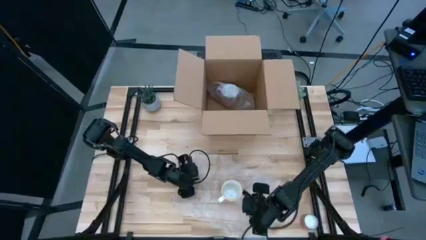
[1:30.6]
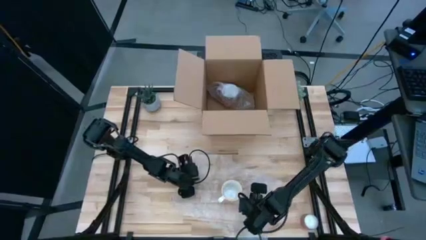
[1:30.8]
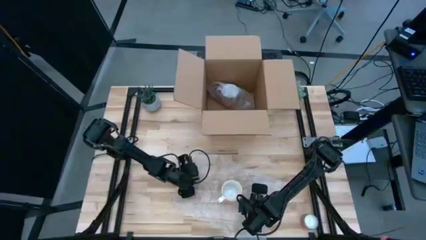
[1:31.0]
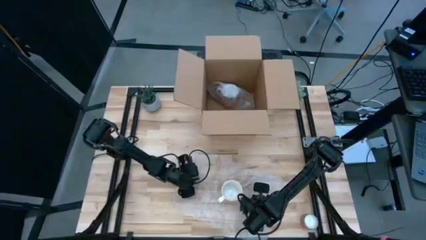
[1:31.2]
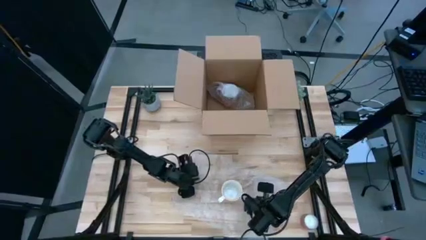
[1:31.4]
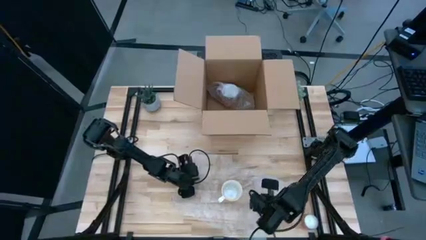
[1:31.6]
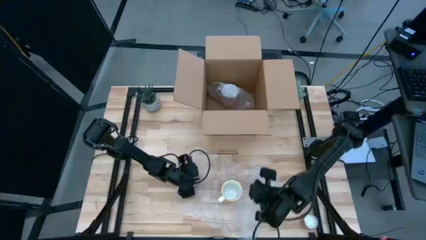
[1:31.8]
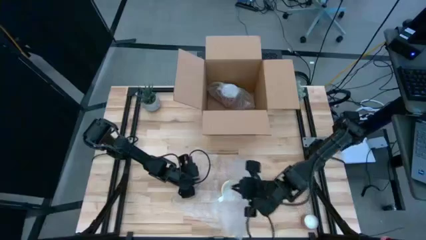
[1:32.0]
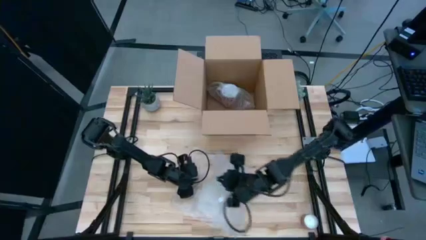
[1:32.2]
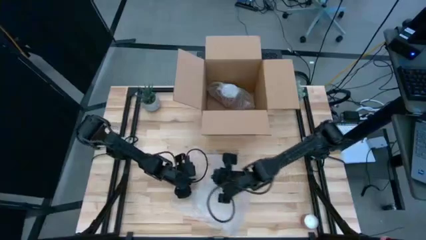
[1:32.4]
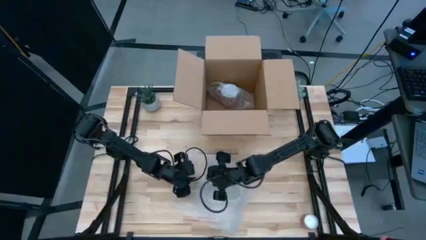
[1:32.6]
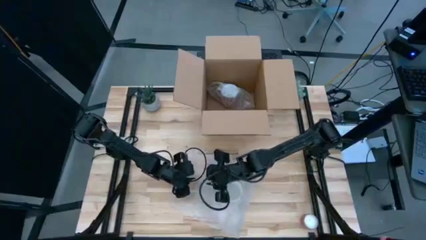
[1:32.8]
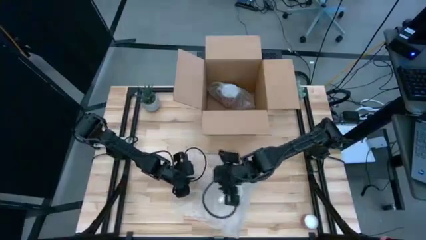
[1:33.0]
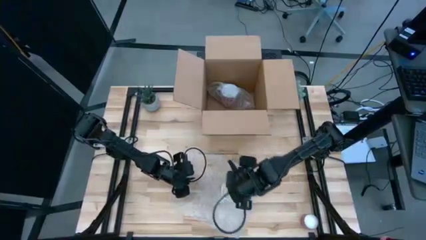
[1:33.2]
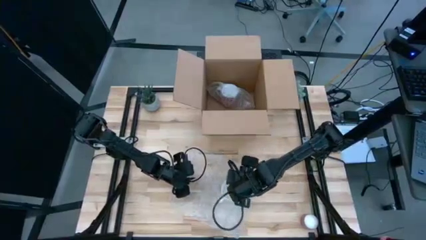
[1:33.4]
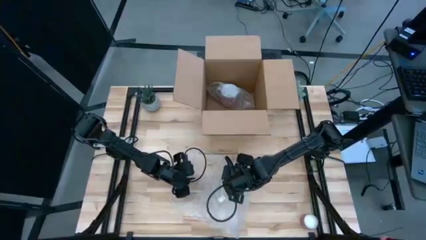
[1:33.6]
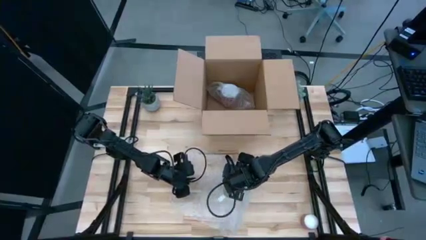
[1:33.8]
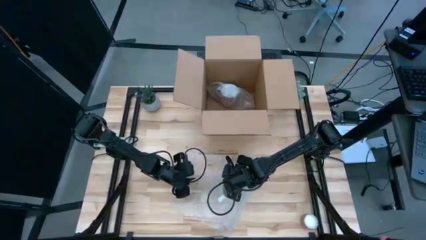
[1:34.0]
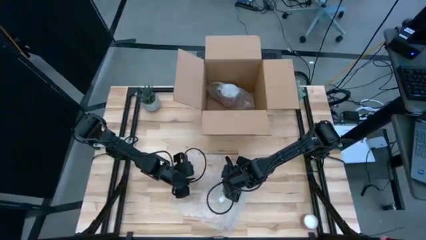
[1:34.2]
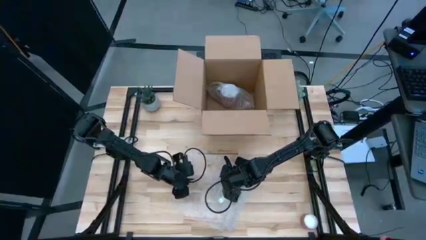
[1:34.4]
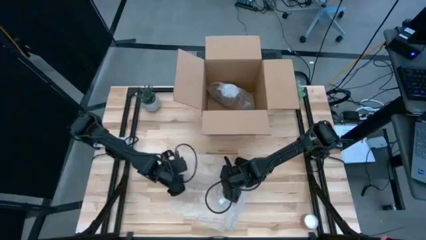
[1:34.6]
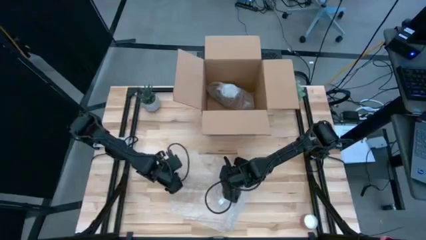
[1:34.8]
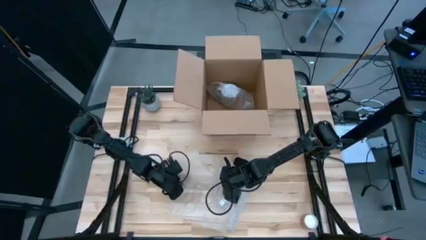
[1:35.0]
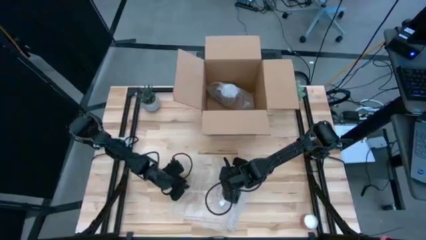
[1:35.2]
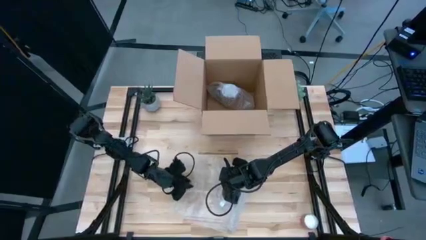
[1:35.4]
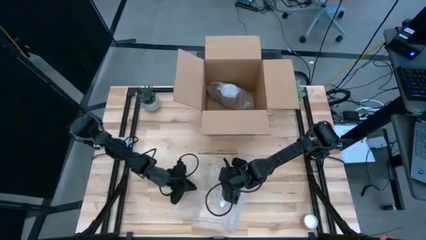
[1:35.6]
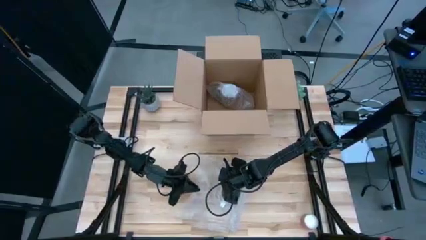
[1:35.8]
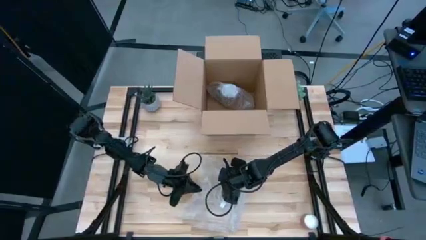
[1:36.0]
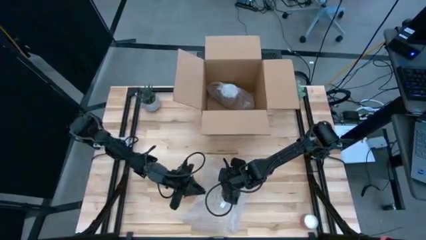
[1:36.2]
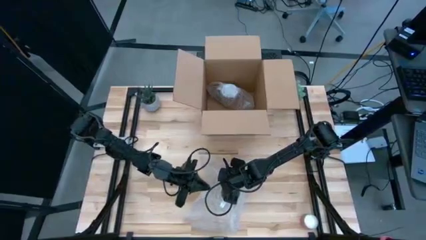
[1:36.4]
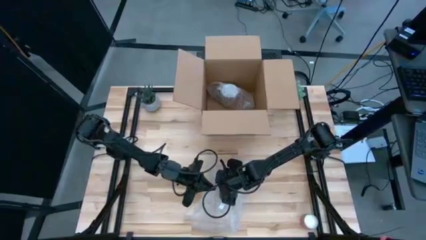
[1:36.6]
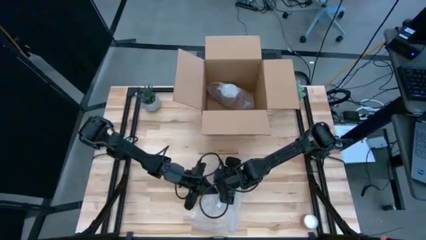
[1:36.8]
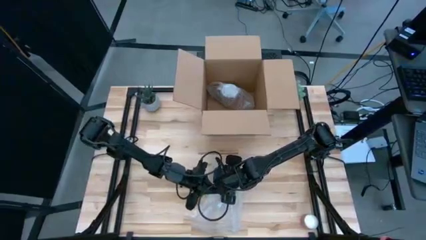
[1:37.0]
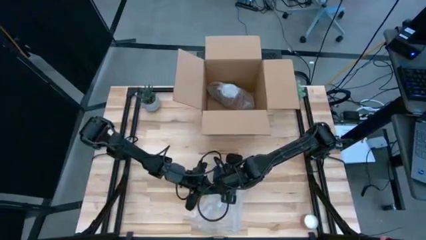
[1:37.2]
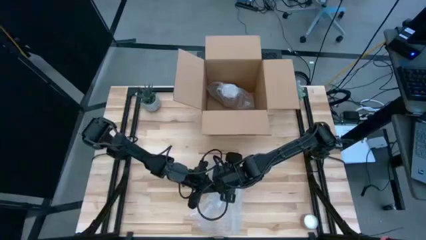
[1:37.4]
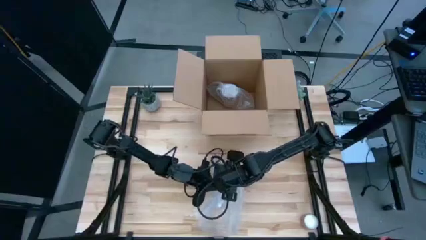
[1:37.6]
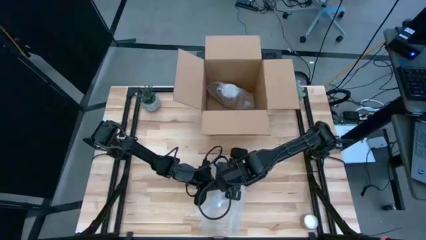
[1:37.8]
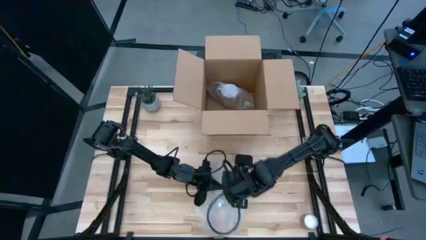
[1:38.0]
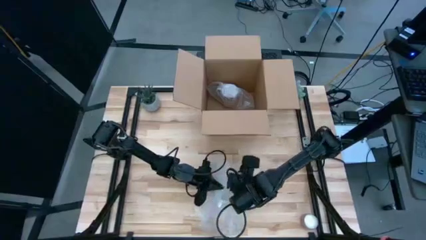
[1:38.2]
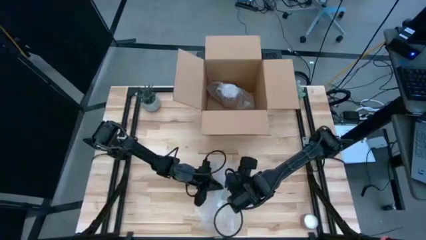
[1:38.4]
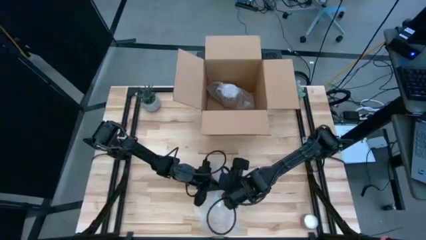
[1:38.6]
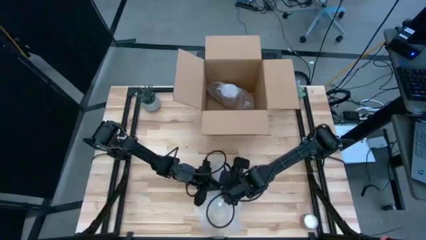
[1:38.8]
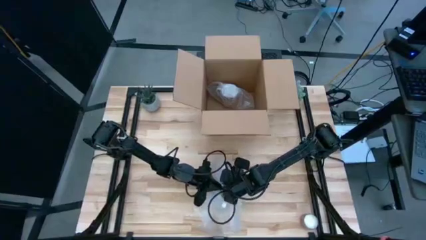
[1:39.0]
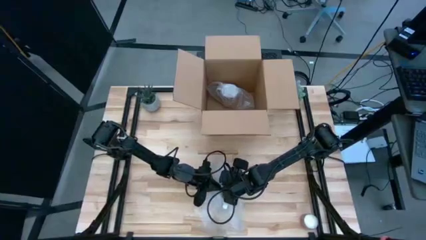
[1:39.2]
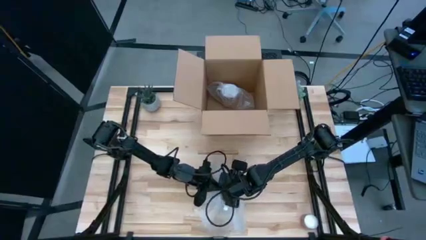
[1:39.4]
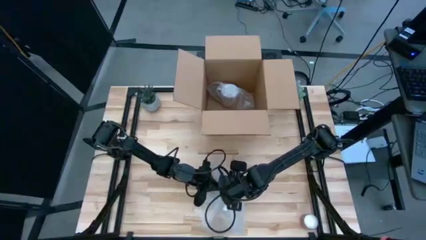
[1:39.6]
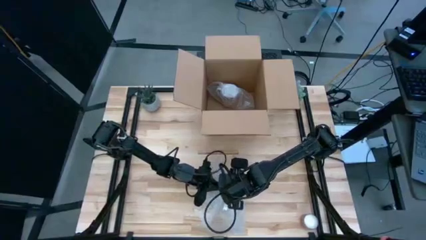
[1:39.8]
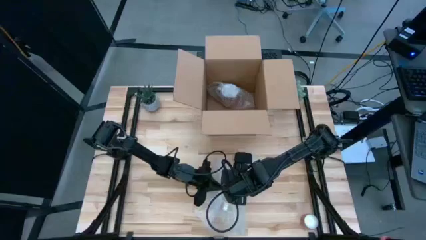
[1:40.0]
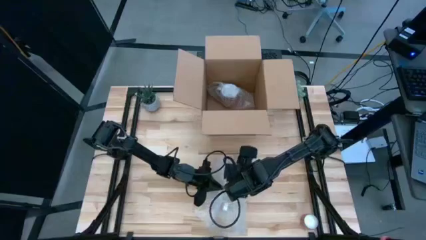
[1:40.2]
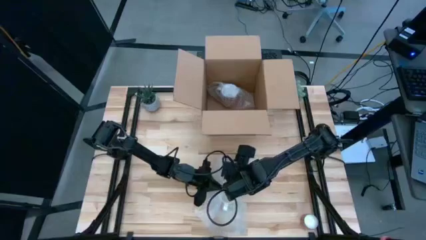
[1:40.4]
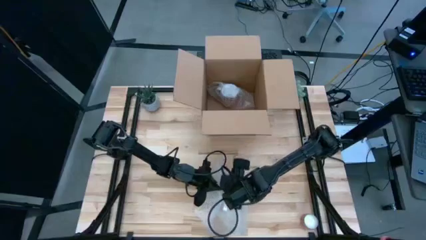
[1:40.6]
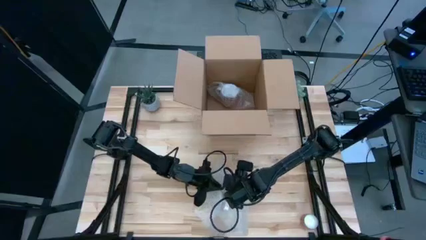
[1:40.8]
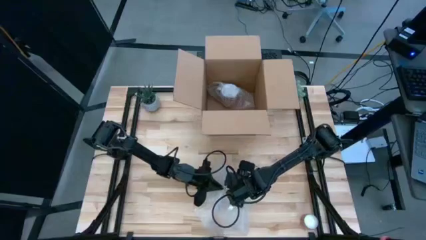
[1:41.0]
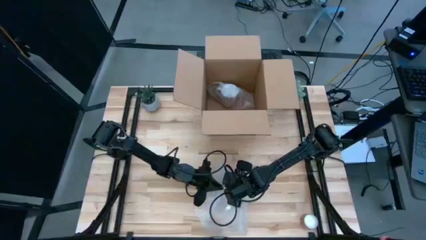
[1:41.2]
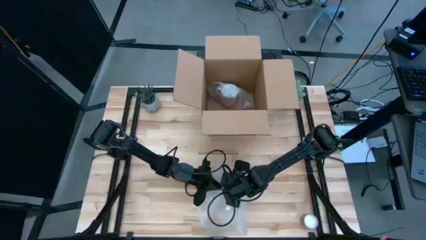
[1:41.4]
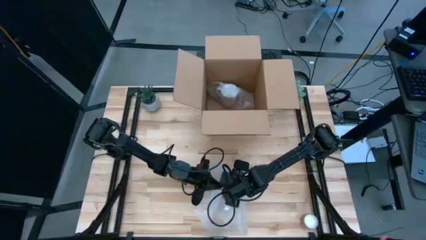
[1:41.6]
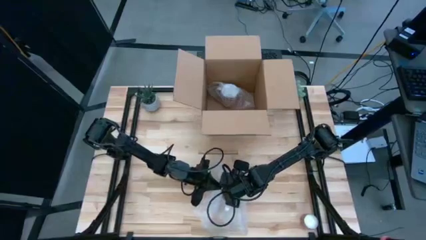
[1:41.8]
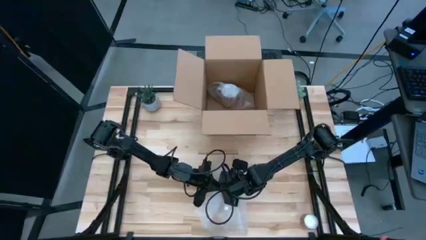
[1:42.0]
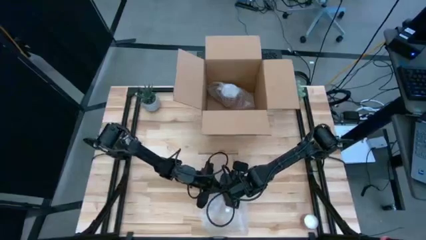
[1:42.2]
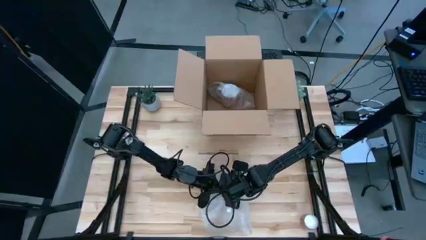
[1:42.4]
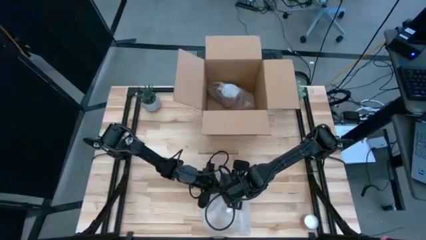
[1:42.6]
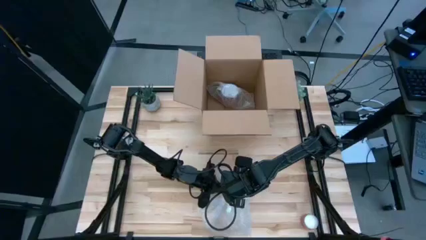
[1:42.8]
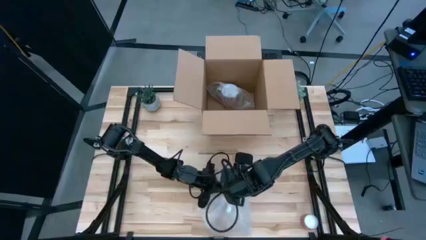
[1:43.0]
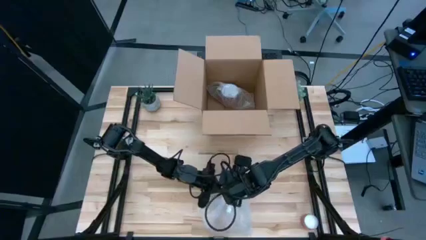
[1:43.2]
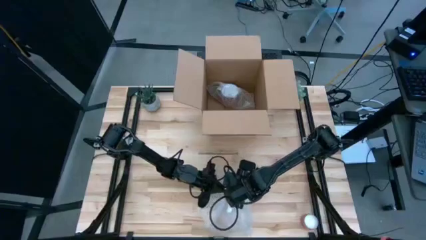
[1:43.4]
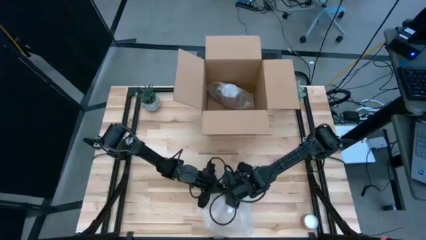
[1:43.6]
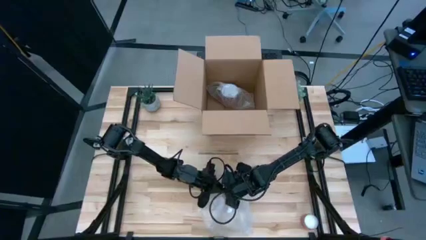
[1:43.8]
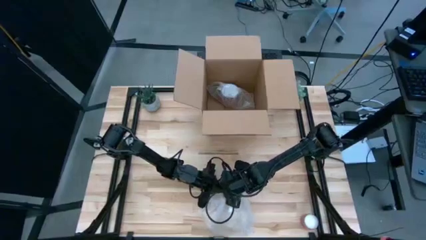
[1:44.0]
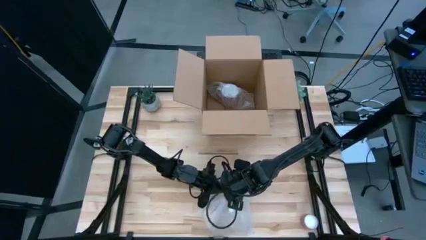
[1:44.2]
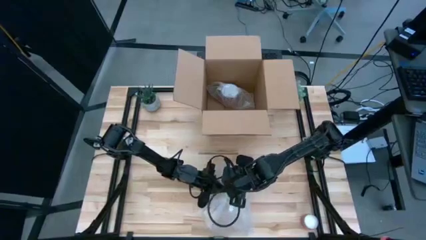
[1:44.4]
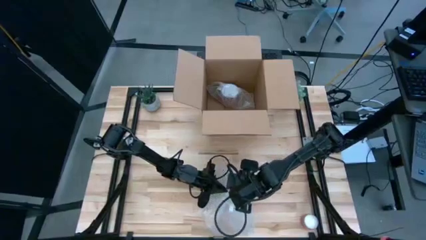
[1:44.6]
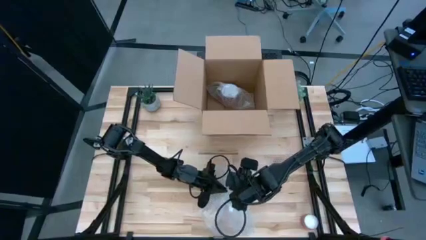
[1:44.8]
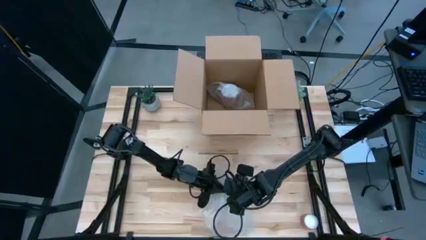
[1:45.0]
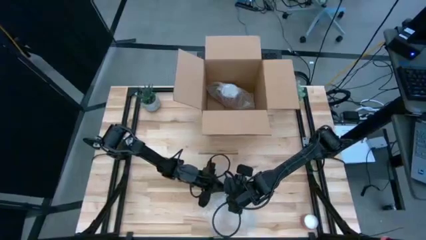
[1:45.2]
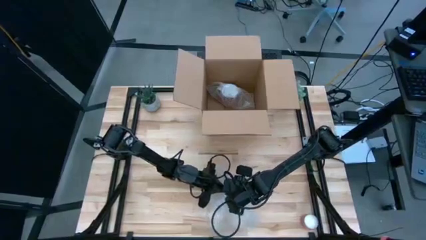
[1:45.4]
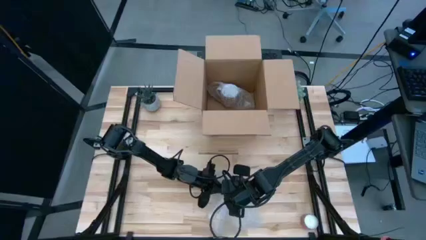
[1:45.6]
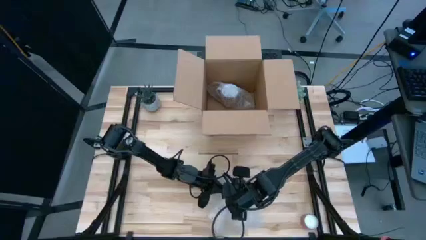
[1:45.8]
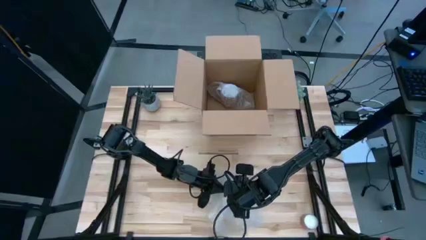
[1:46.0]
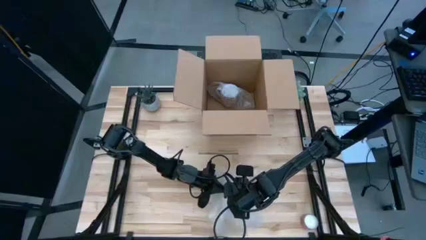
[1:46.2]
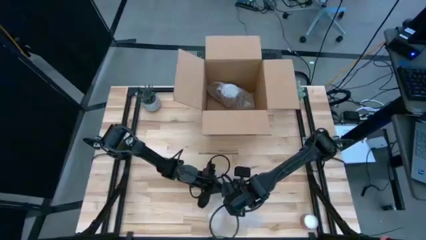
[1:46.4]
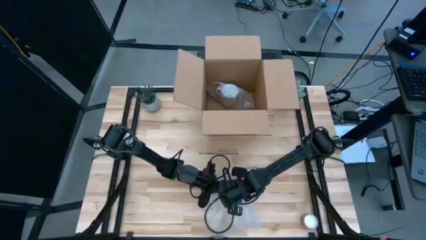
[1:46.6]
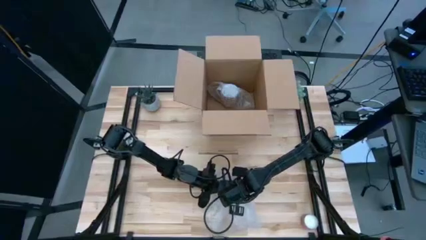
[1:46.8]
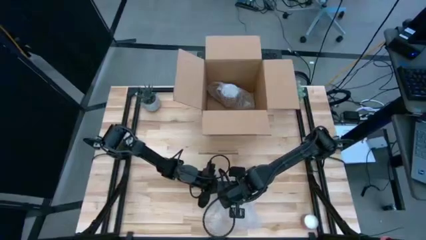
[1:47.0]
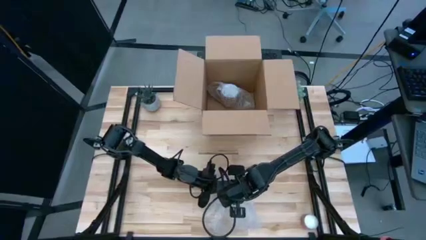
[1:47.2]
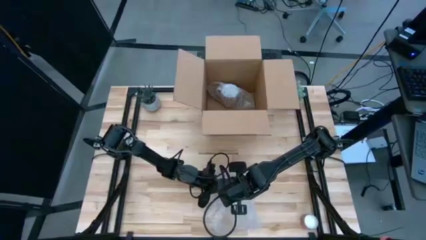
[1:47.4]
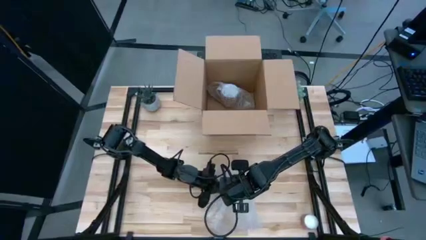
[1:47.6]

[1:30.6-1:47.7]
Task: wrap mug
Wrap the orange patterned mug with the transparent bubble wrap
